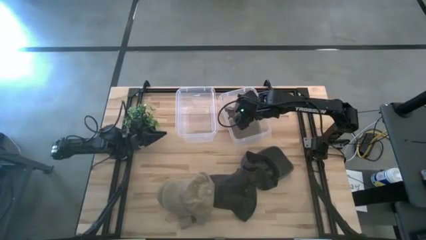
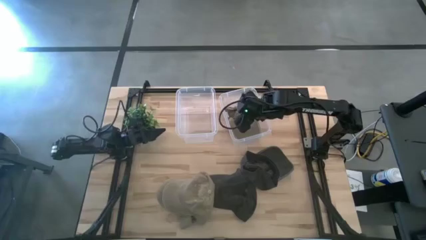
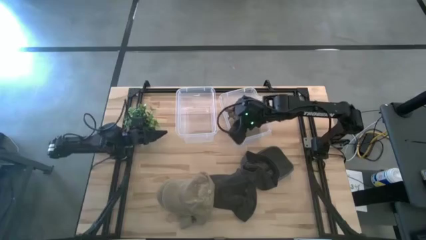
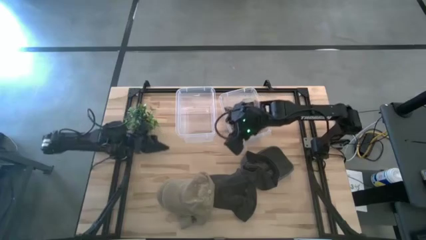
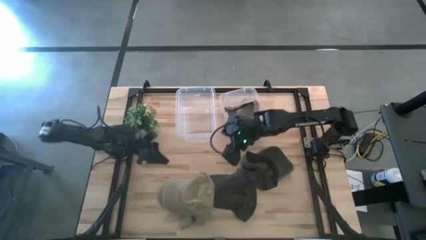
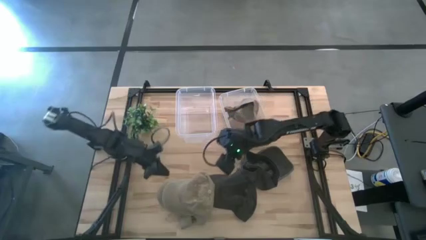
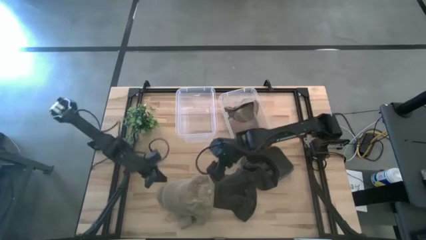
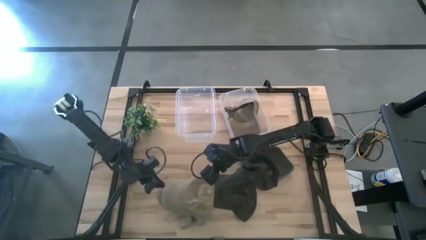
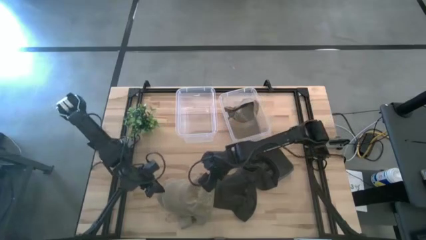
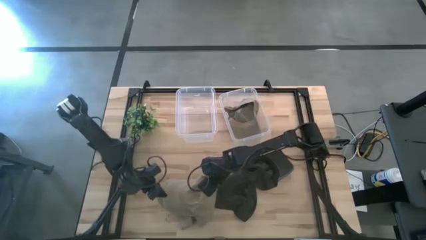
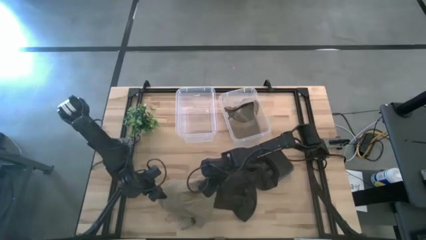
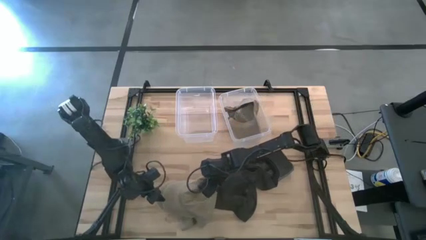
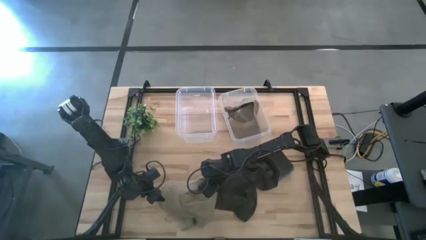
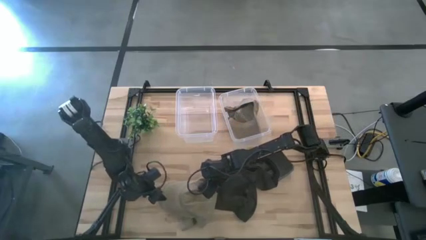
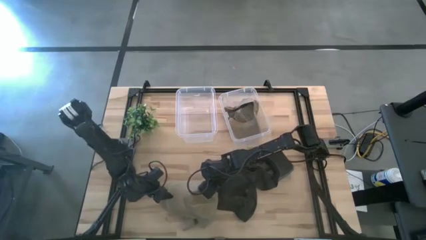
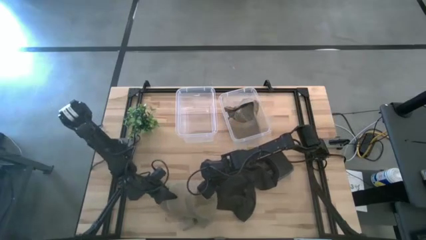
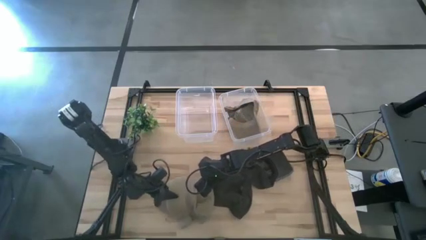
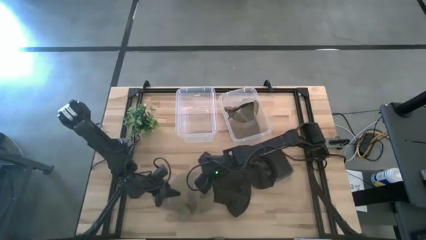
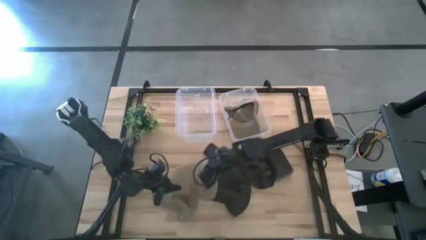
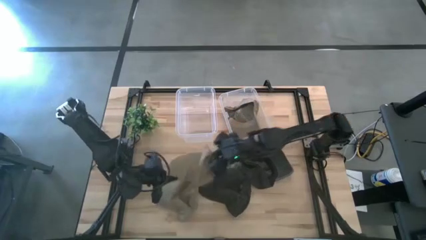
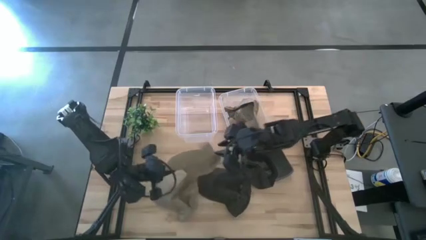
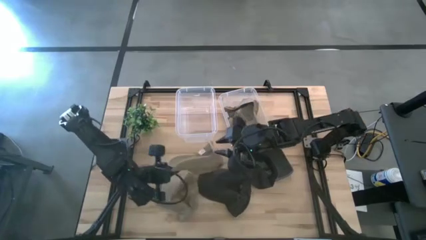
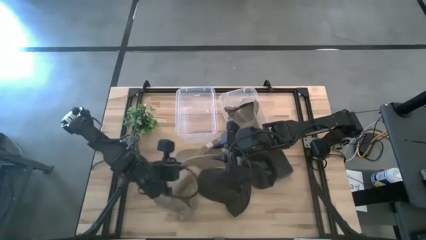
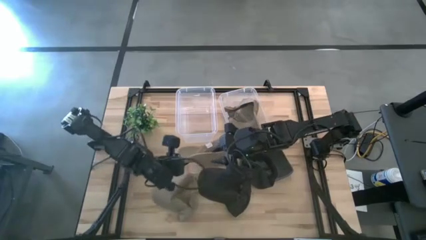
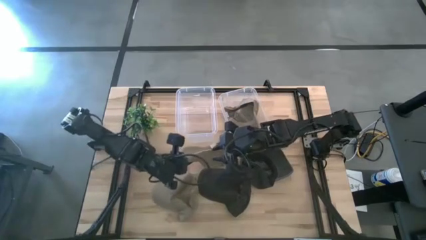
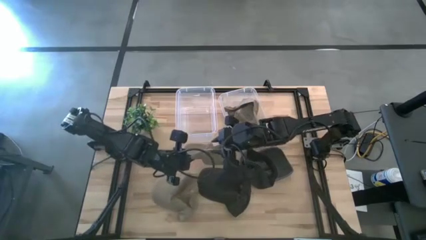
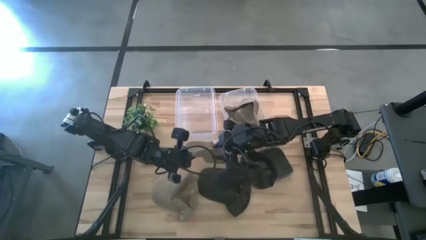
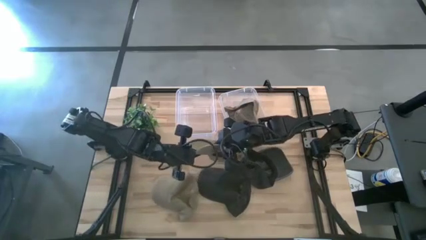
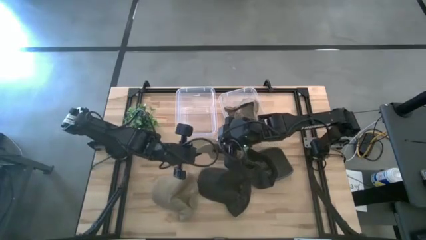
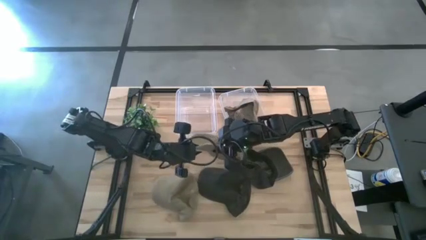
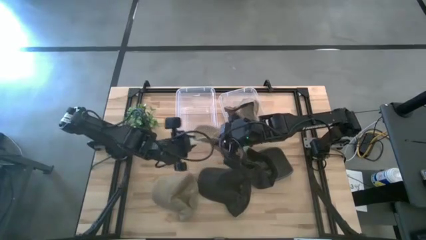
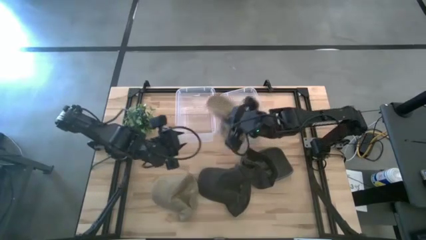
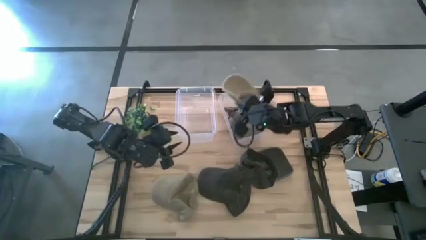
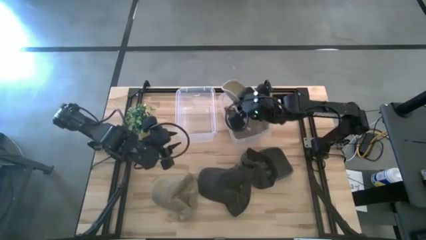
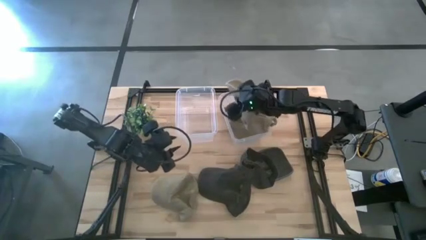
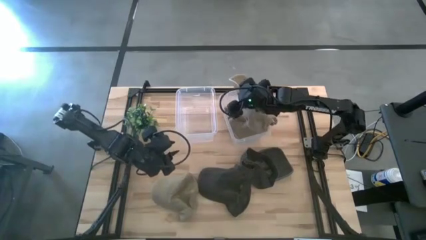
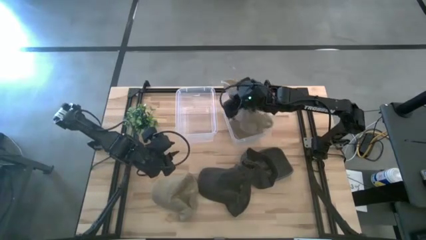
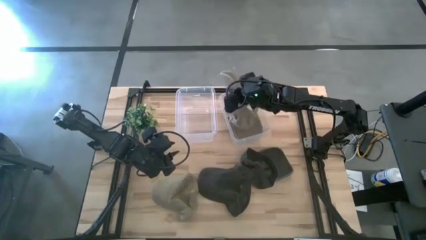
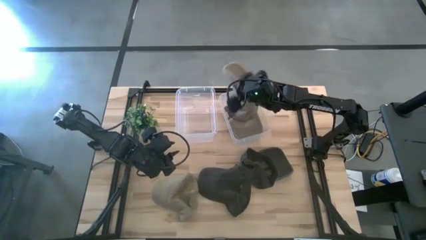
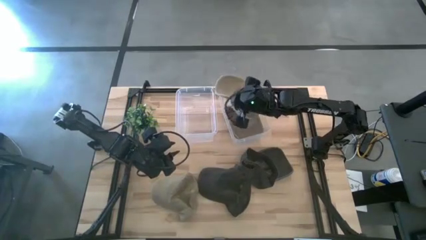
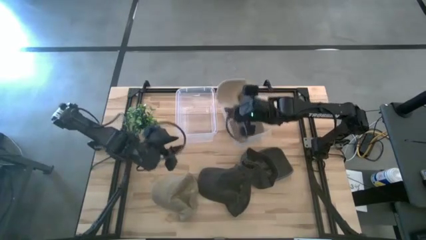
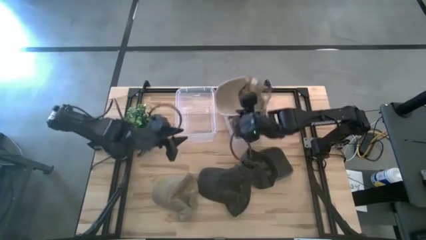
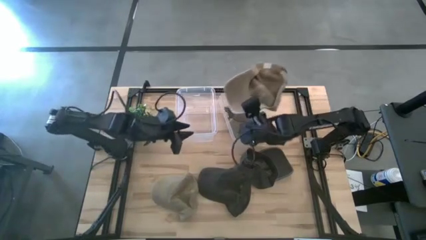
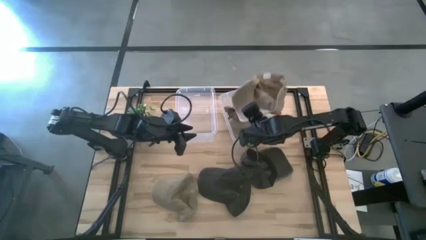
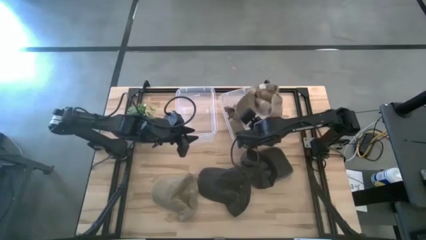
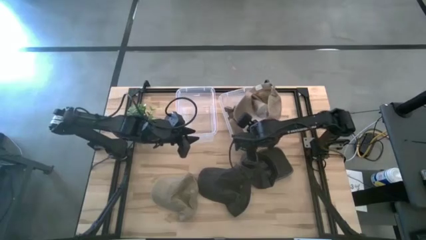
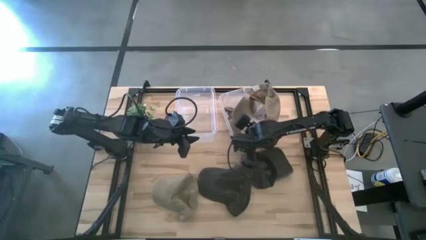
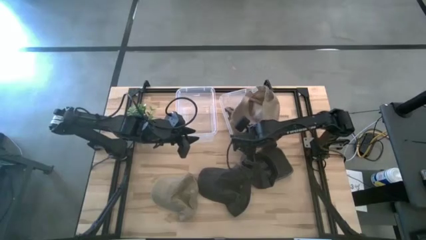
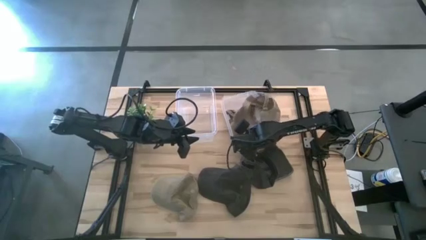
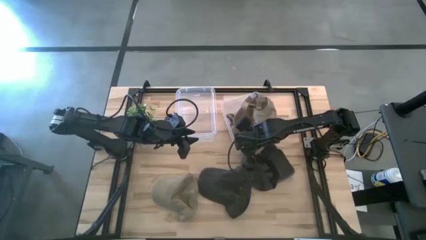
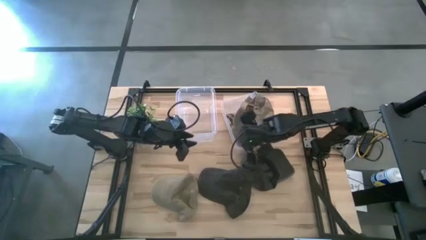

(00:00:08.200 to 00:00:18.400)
Task: Pick & Place hat
Put the right brown cap into the right transparent bin
